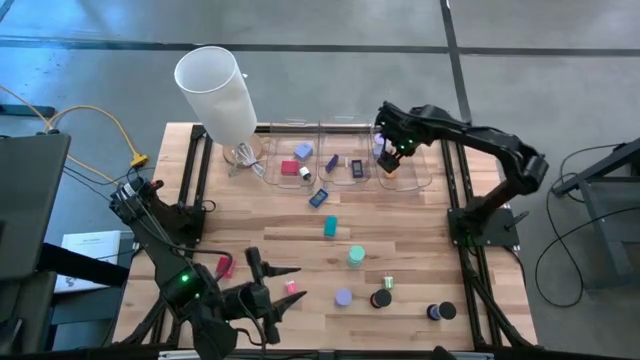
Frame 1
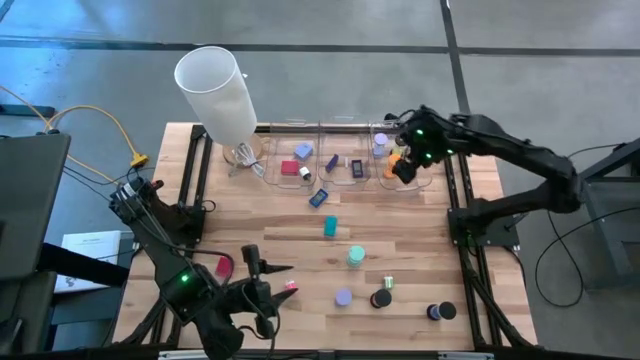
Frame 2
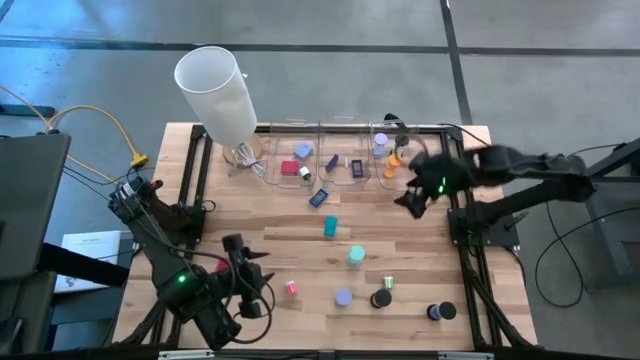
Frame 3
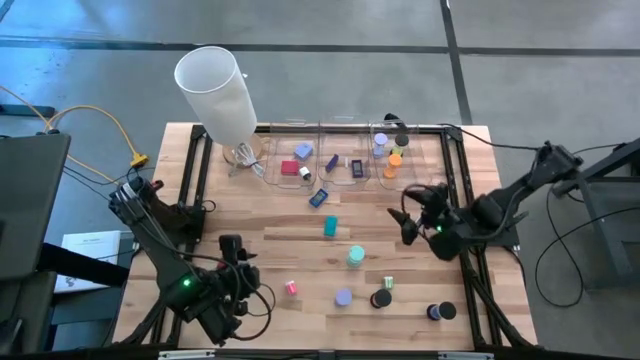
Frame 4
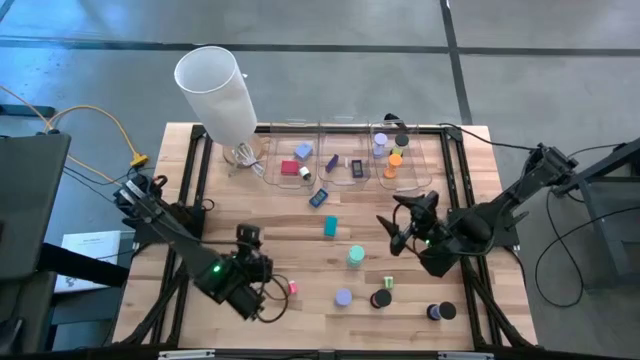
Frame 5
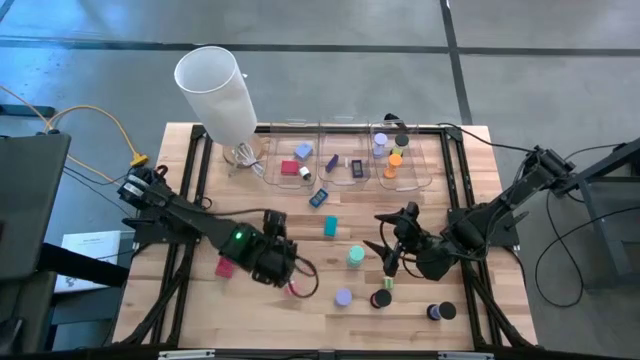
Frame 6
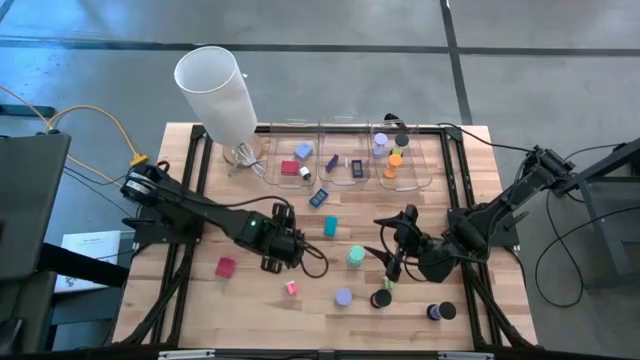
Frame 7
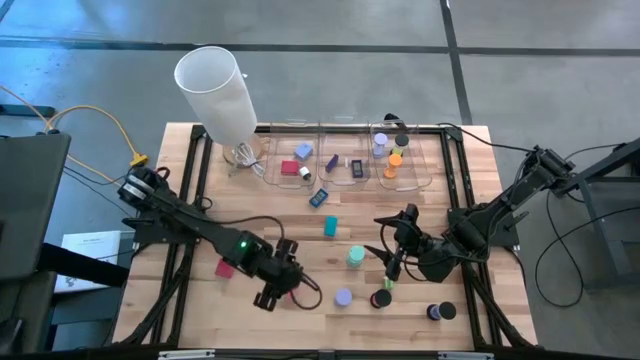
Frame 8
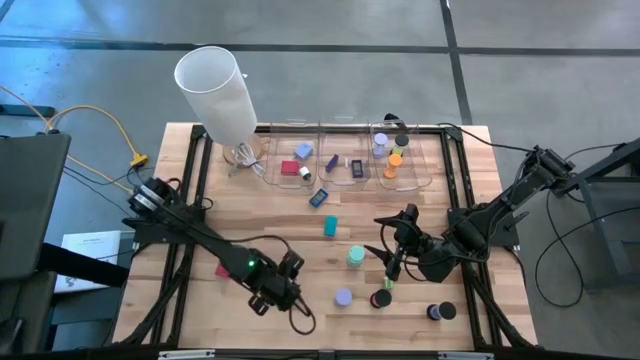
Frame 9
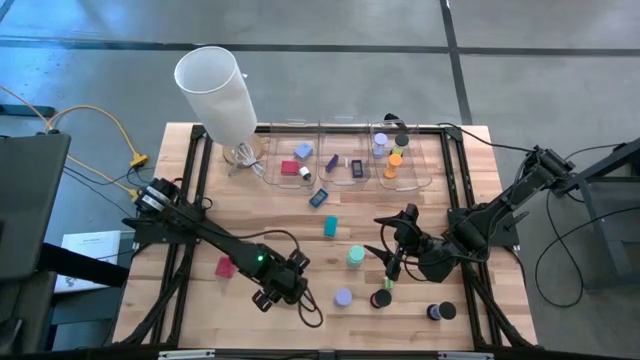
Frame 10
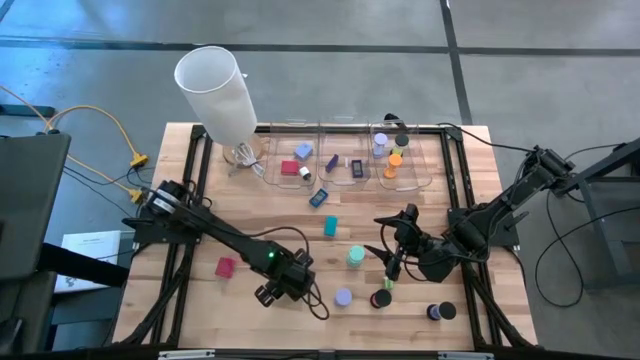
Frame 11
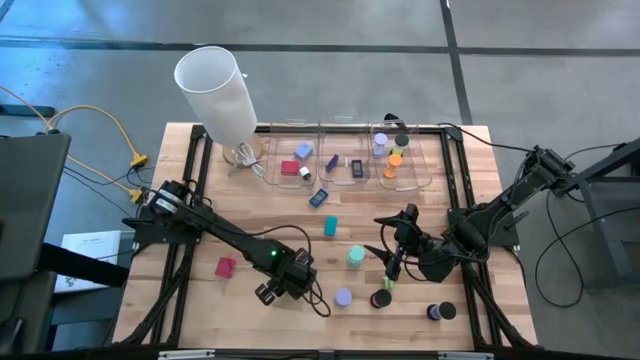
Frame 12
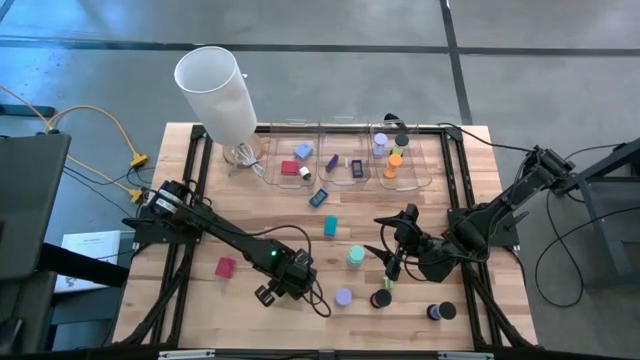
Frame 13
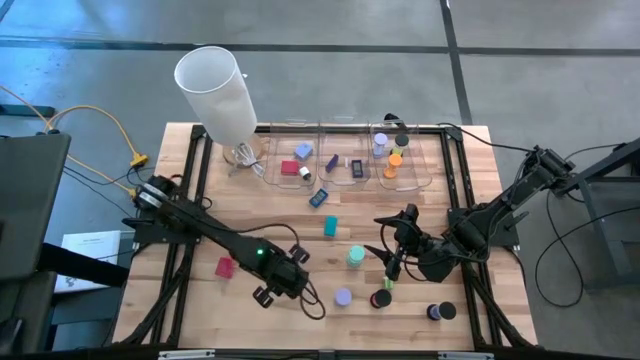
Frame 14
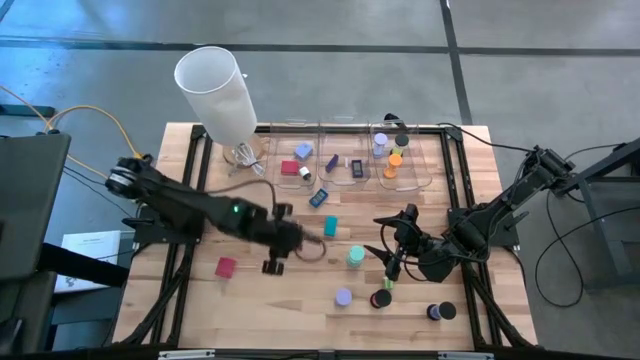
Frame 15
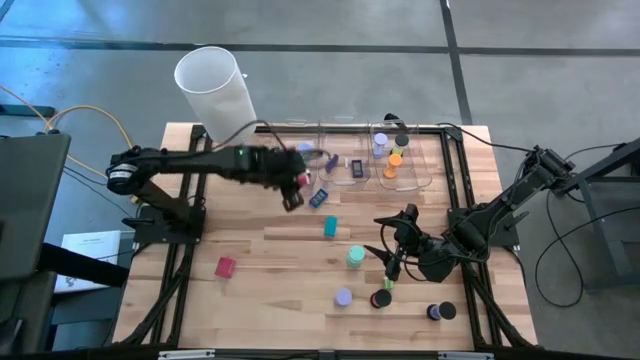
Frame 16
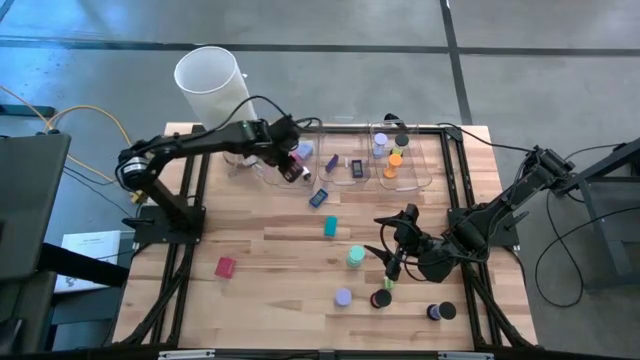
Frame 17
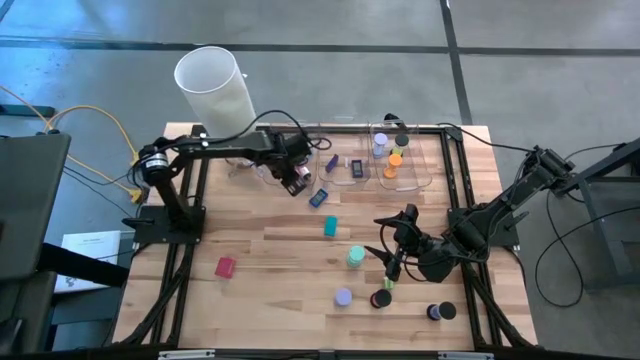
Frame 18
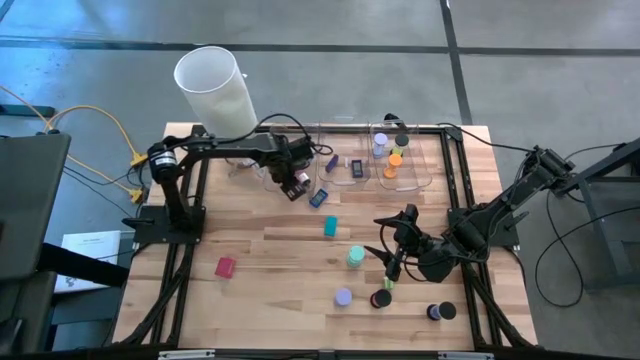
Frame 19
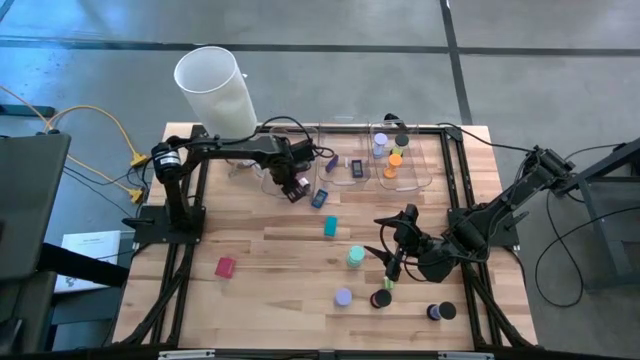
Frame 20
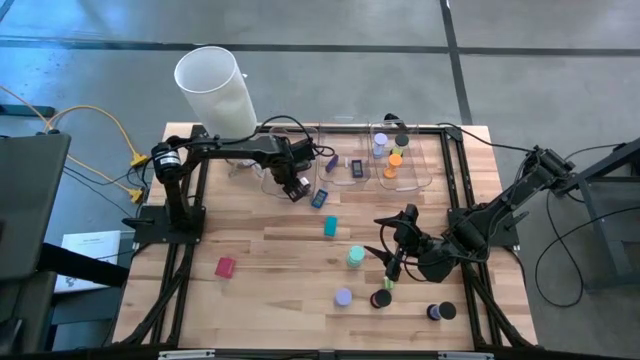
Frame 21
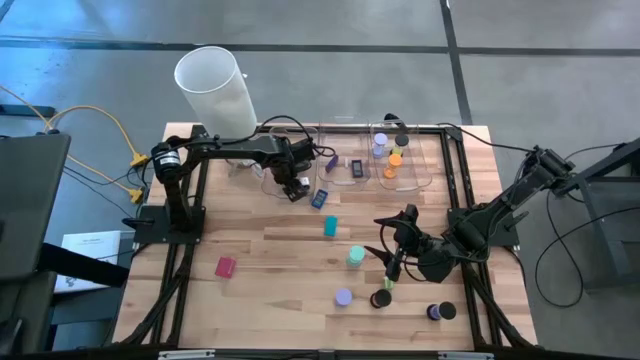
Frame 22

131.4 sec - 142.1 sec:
Task: Pick & Place Office items
Put the pink white charger adapter into the left transparent bin

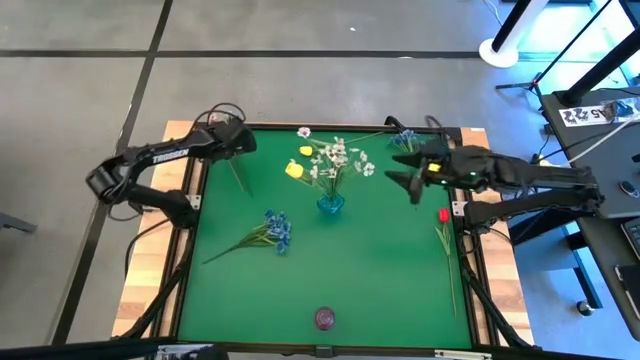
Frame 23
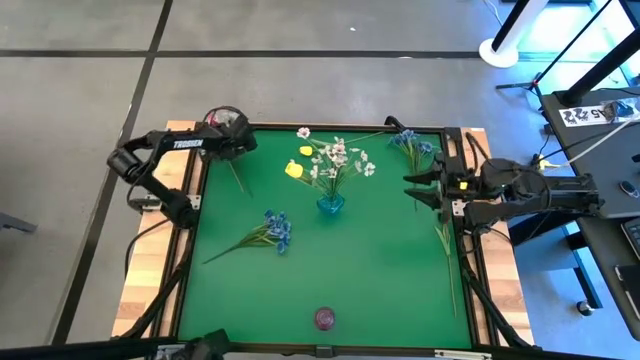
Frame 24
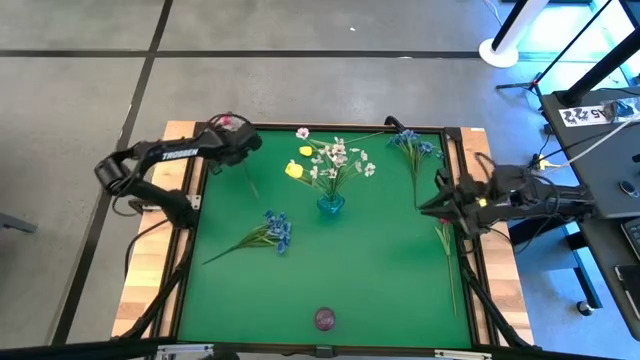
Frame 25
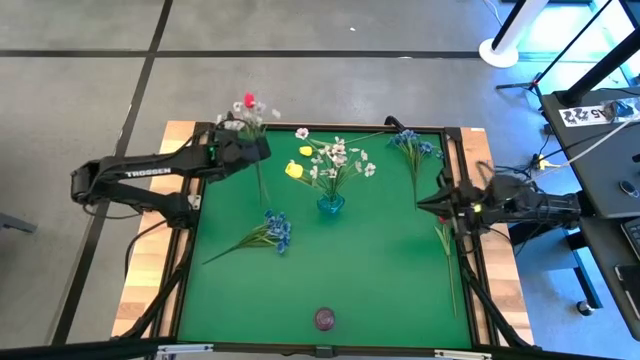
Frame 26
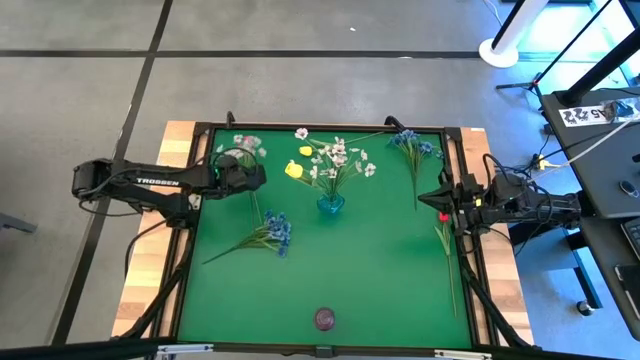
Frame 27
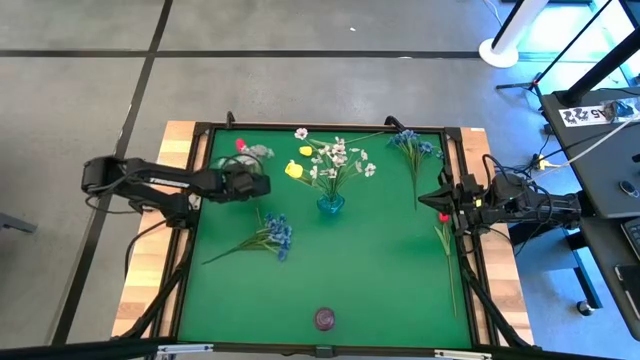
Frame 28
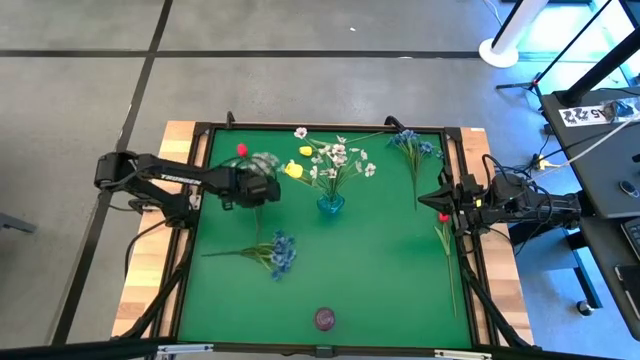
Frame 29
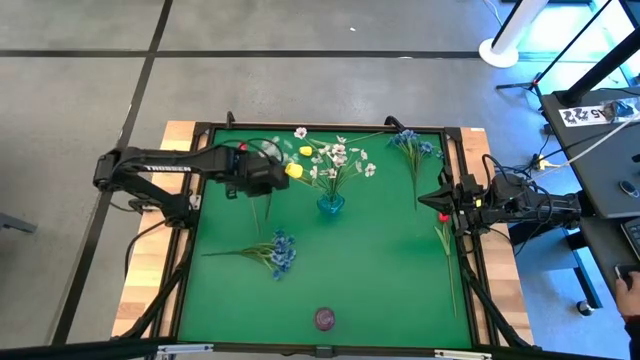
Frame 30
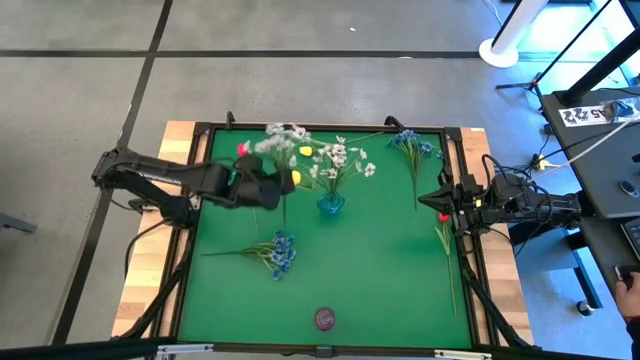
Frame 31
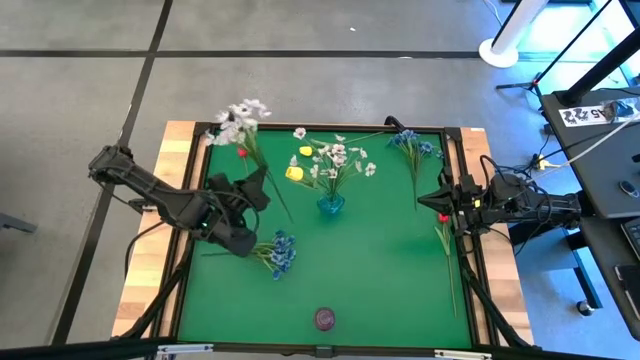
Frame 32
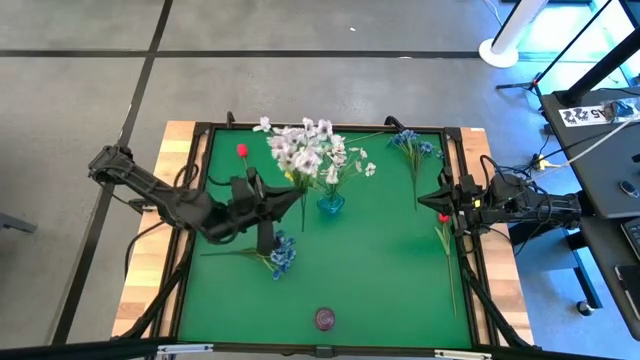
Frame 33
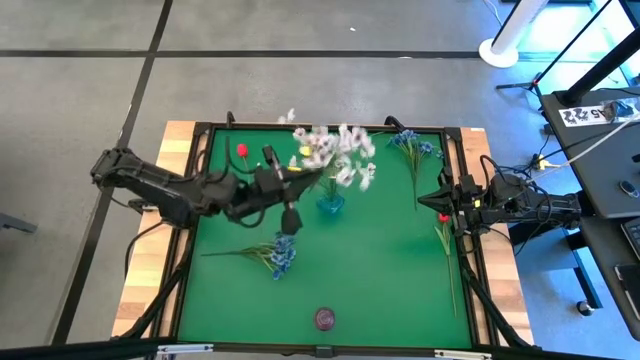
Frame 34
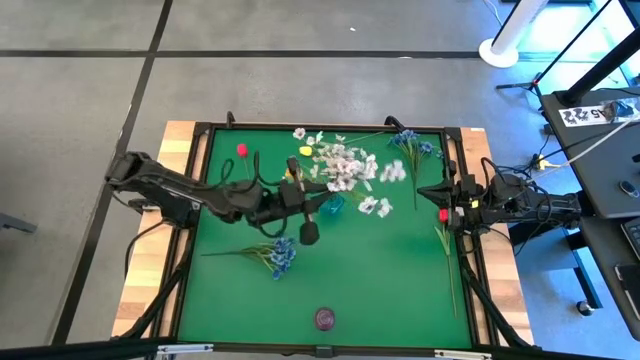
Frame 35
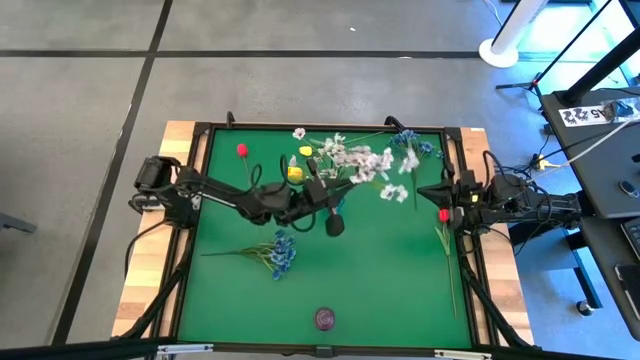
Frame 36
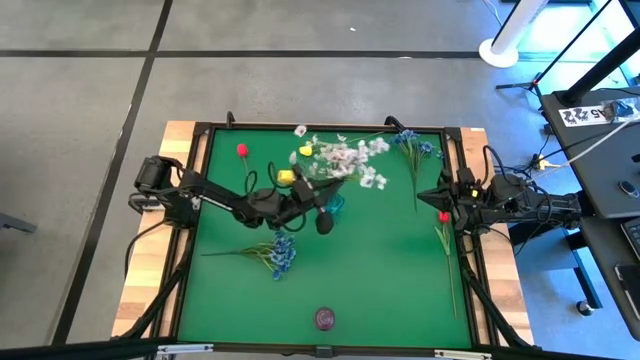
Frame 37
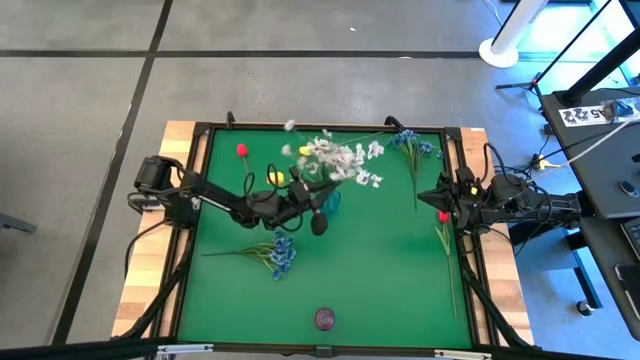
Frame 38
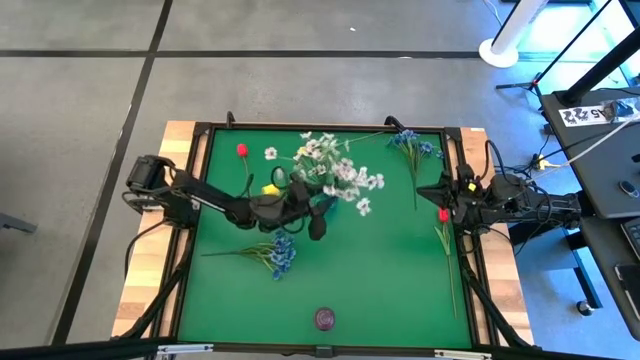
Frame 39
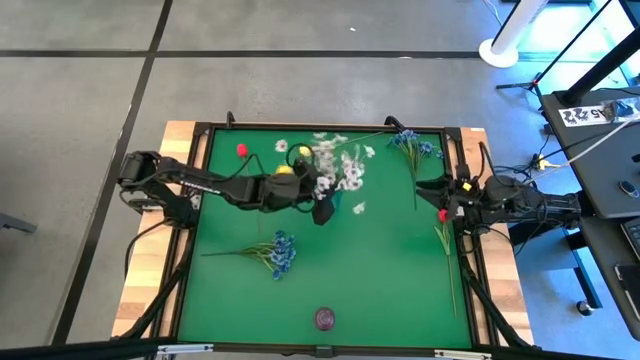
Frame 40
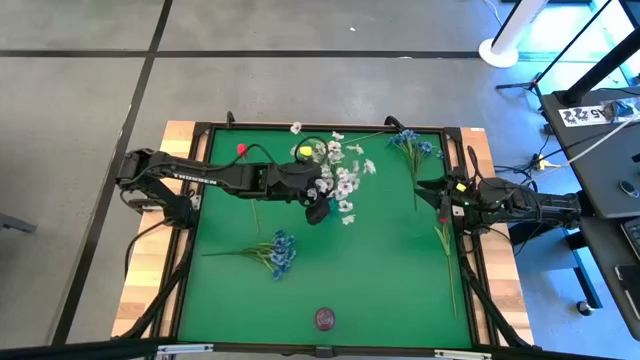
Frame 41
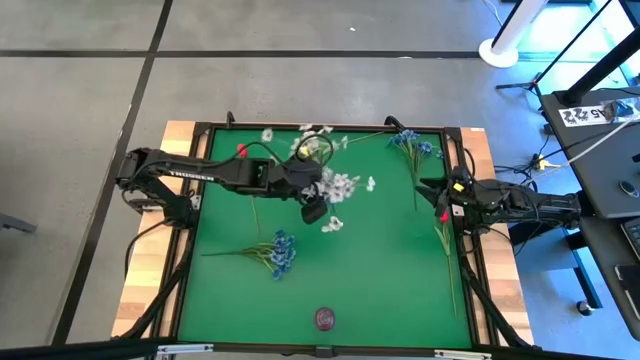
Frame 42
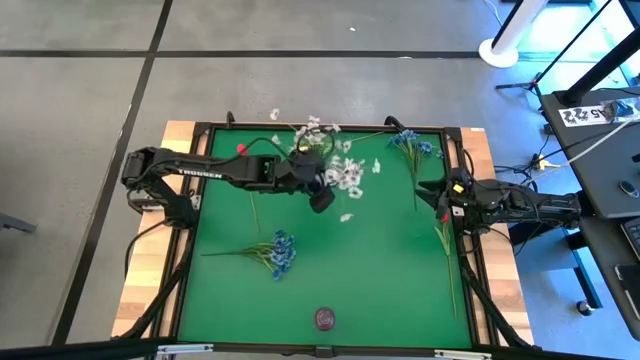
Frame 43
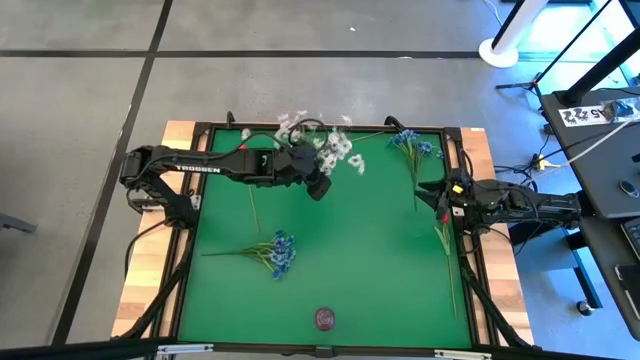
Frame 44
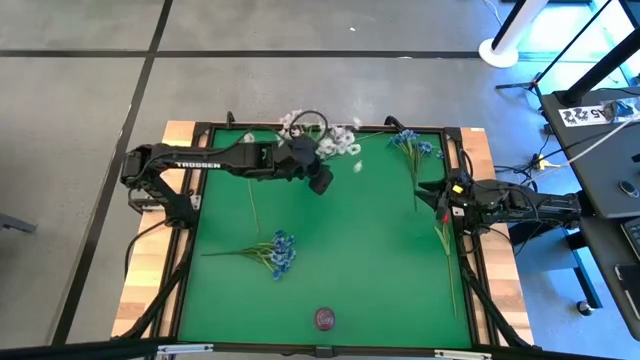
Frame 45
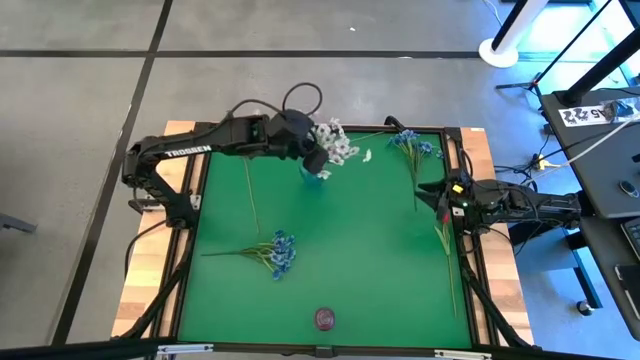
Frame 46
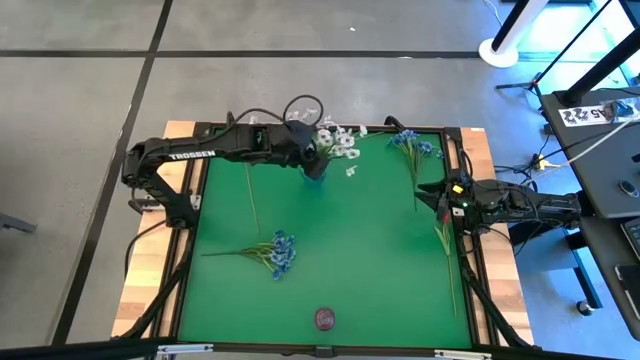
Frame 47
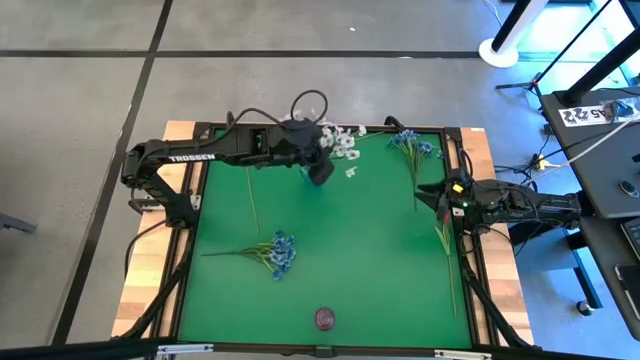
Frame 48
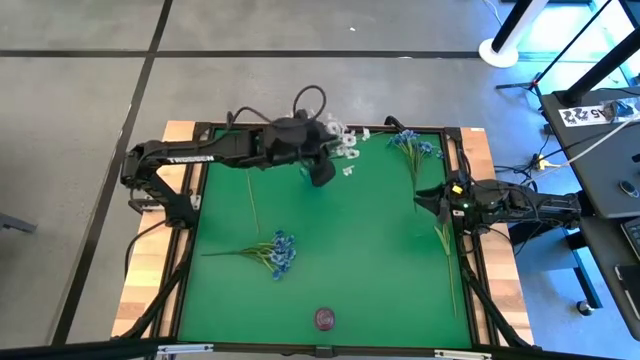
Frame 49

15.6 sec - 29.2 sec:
Task: Sort flowers into vase by color
Put the white flowers into the blue vase
